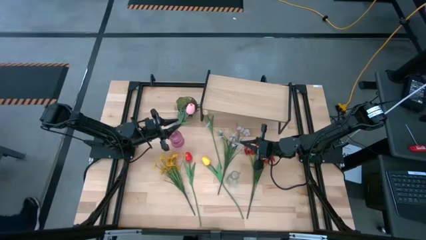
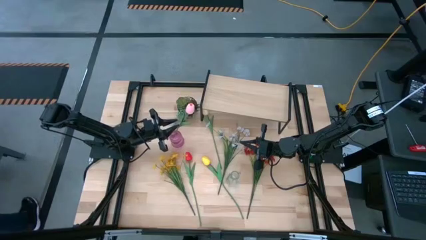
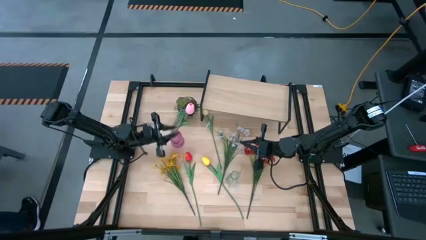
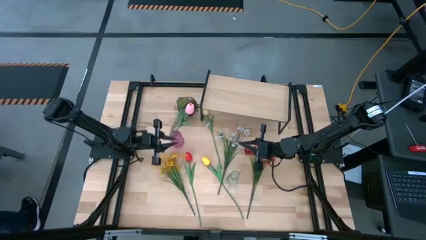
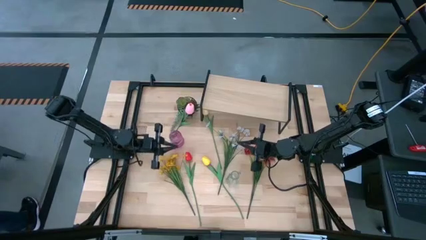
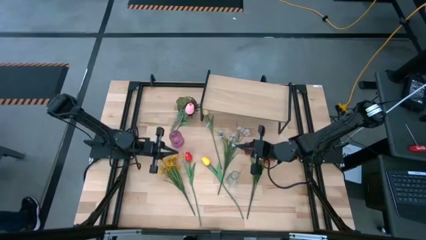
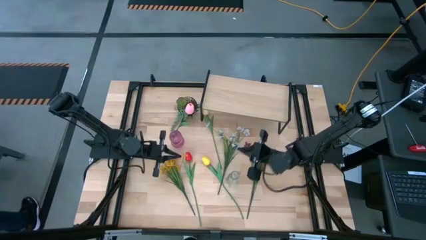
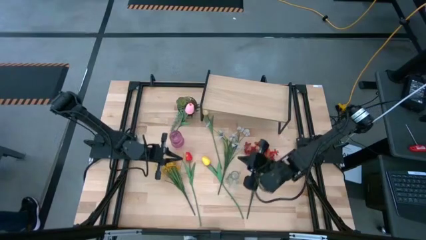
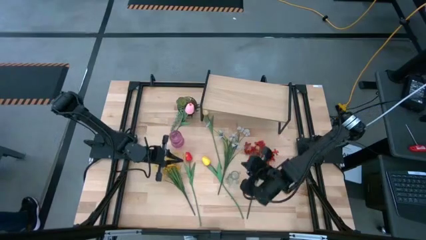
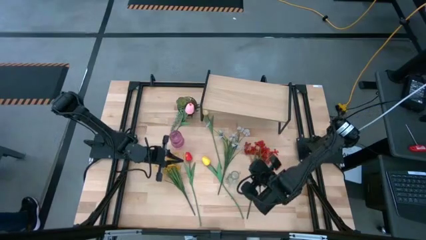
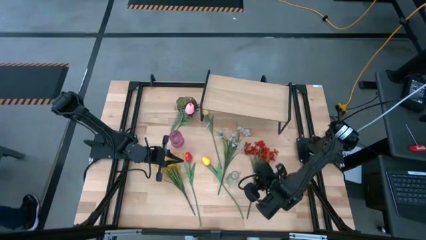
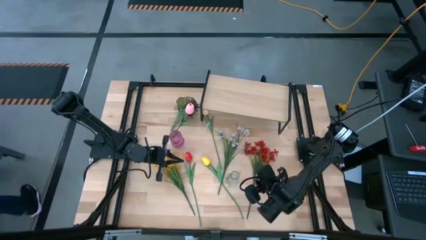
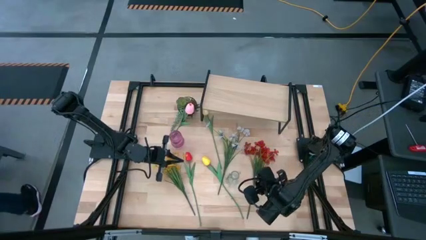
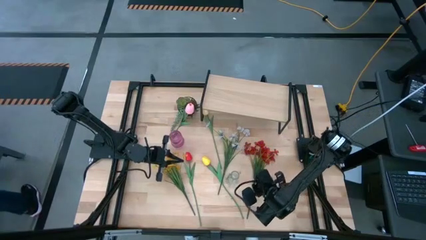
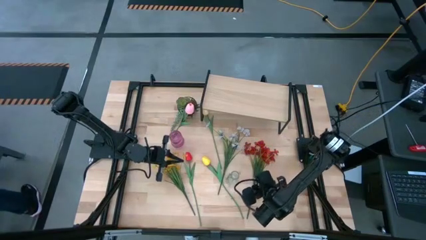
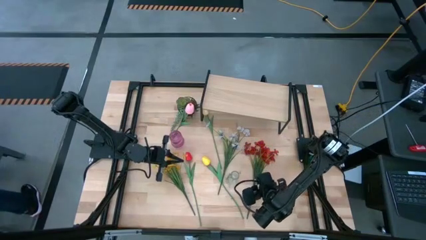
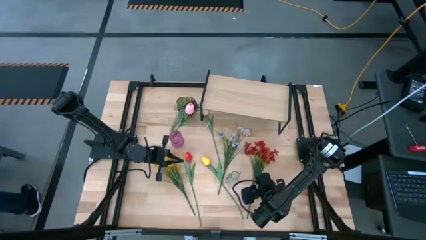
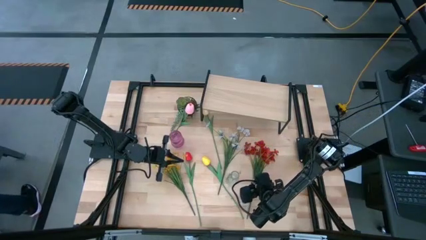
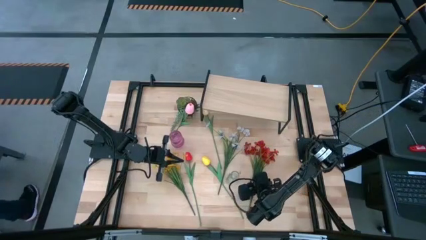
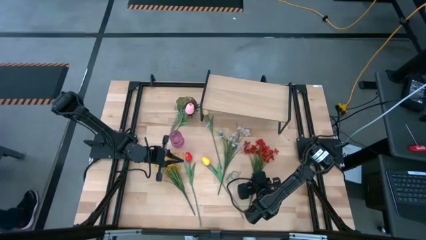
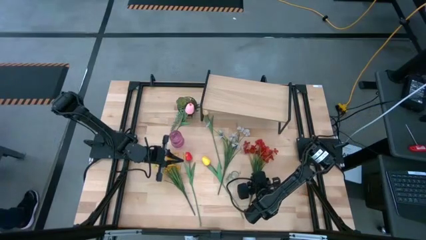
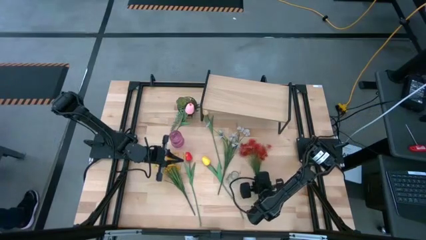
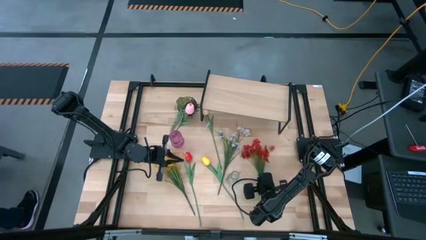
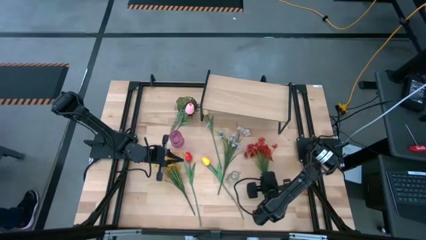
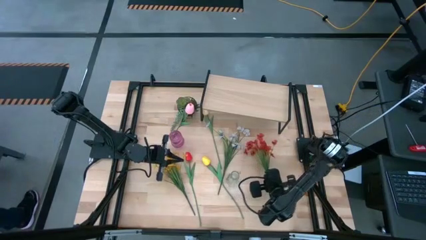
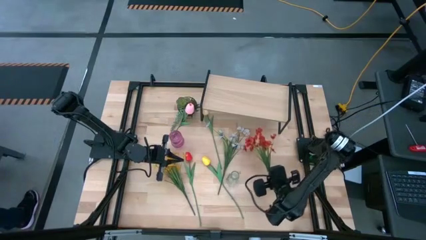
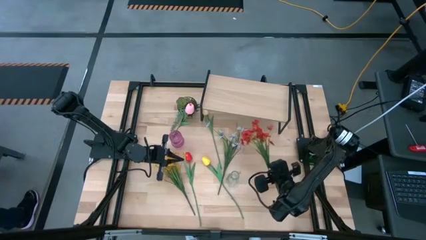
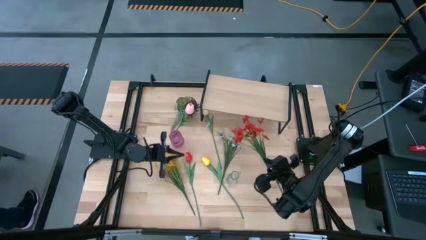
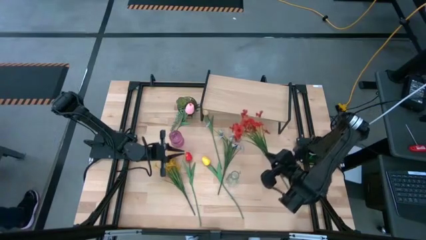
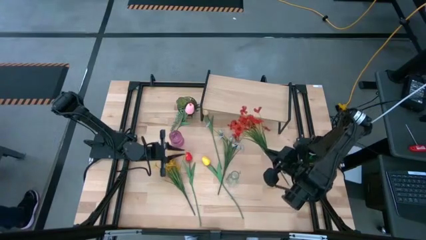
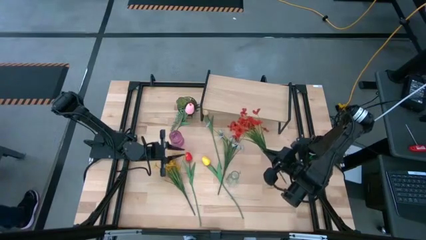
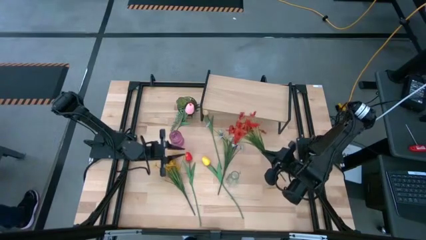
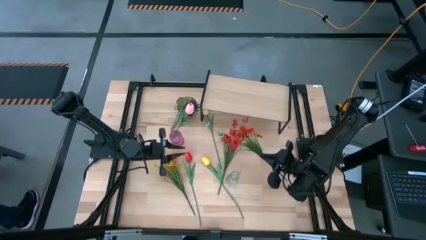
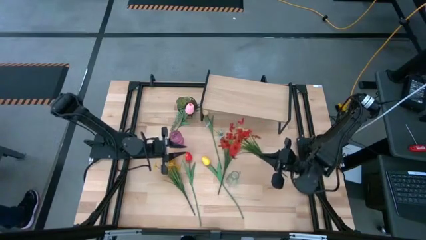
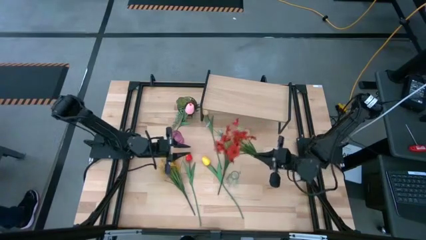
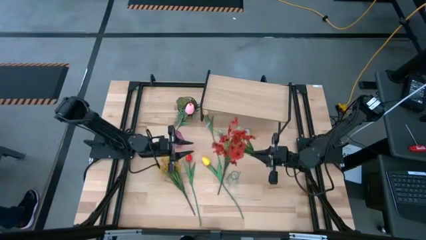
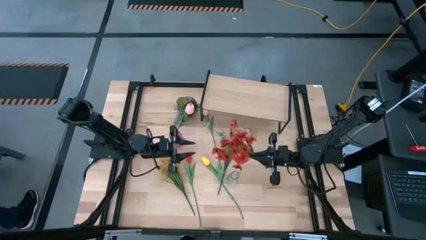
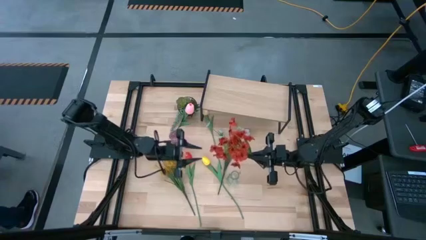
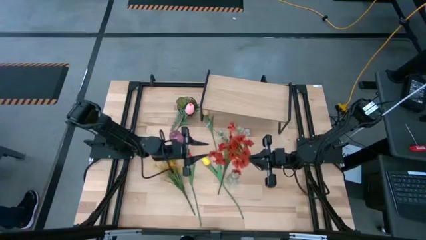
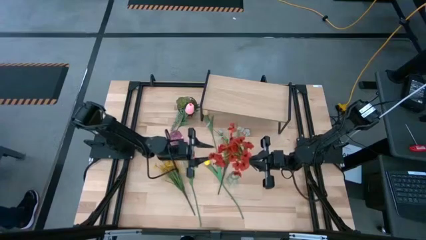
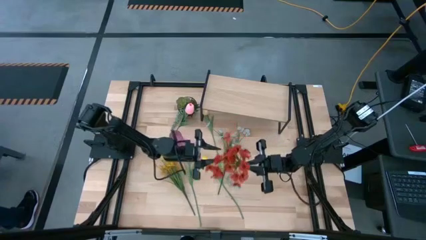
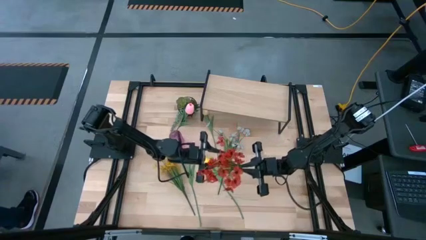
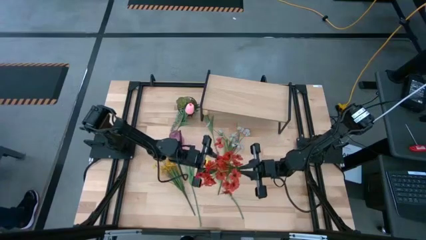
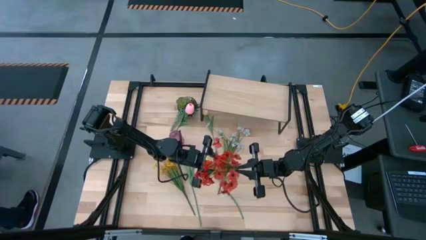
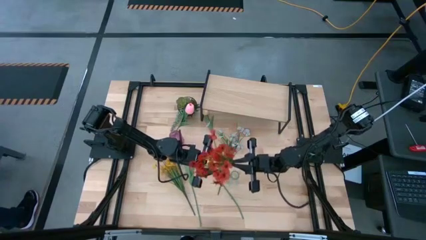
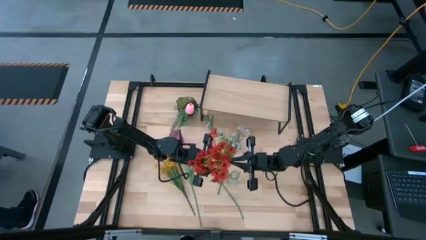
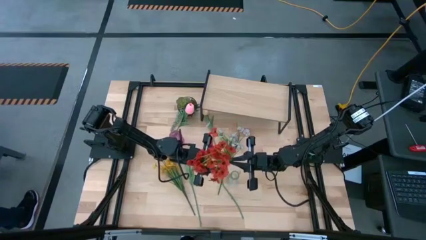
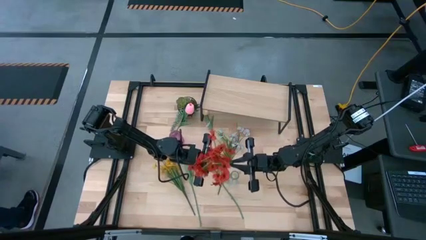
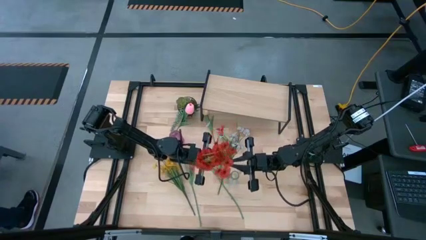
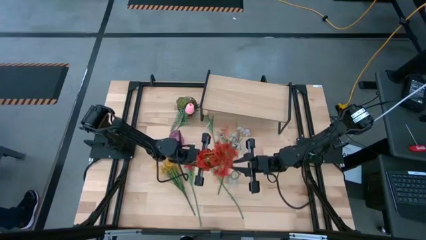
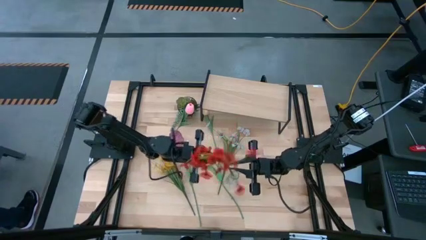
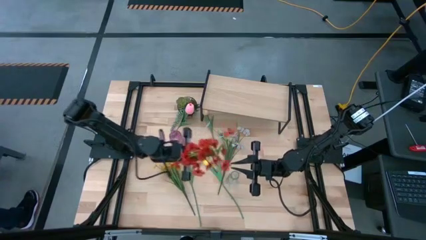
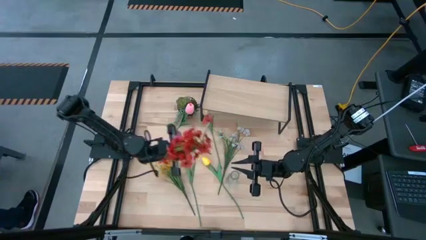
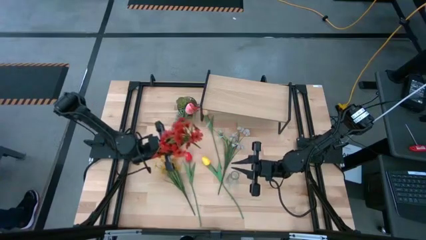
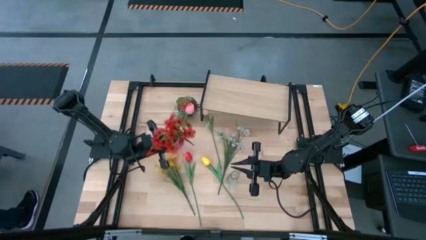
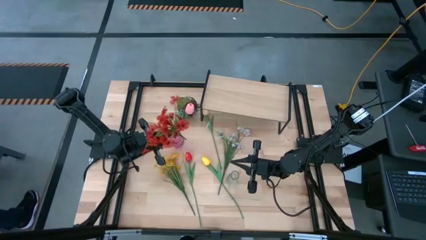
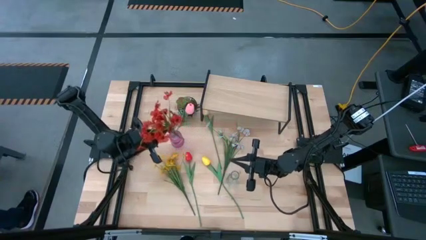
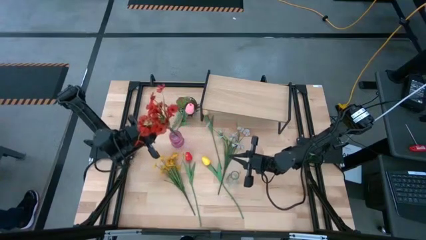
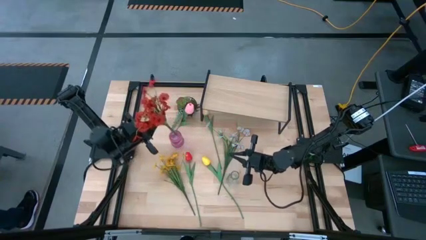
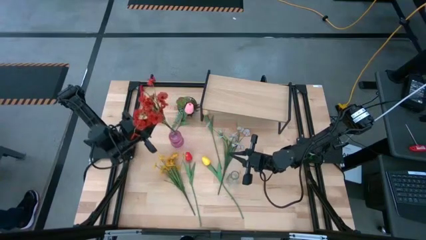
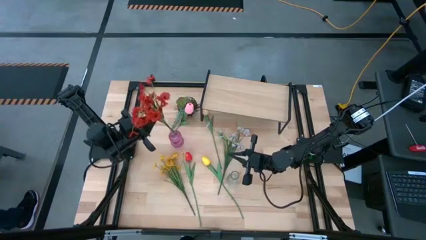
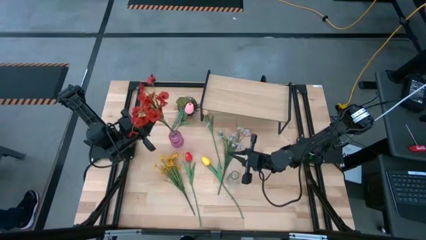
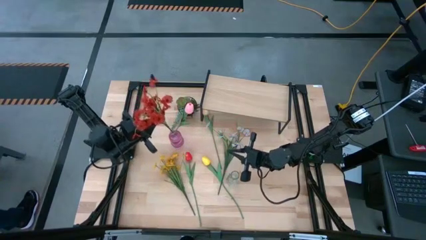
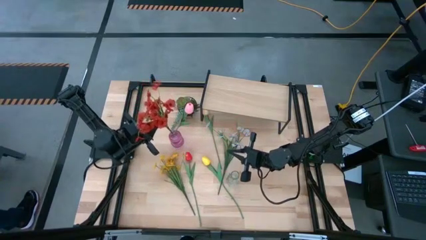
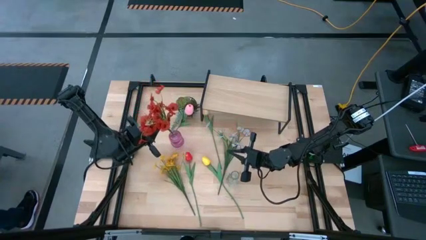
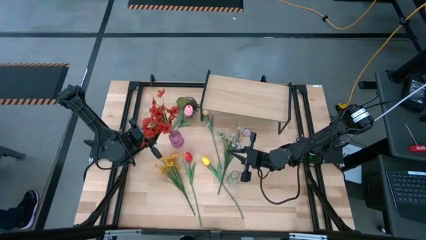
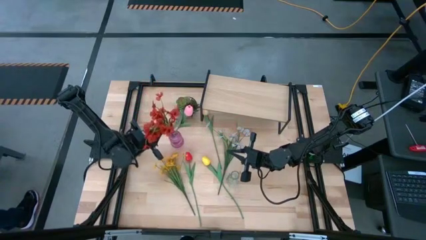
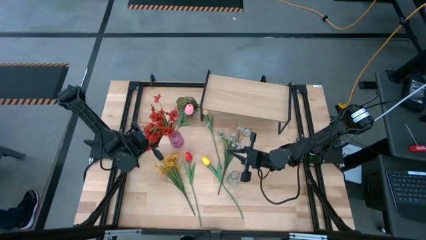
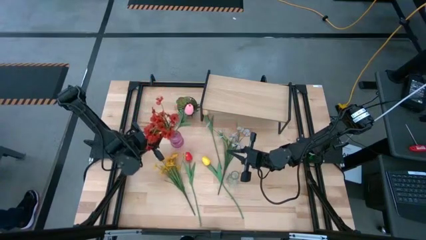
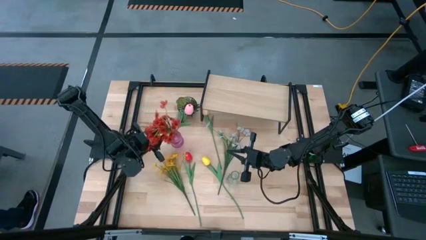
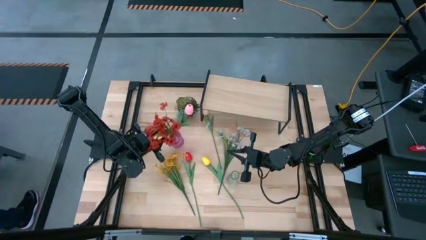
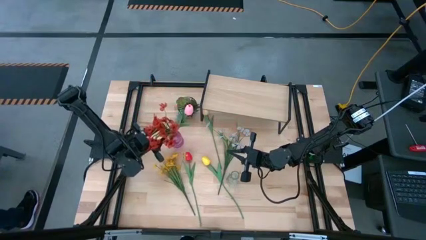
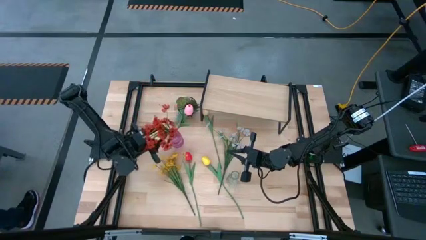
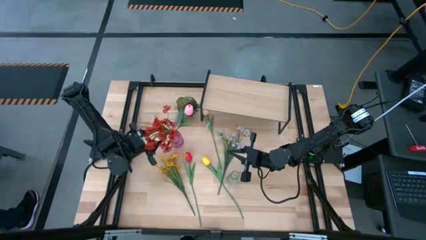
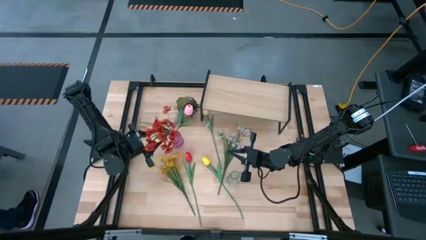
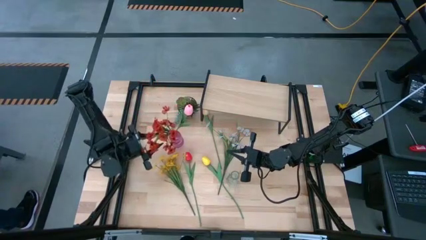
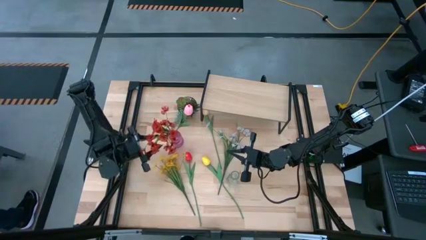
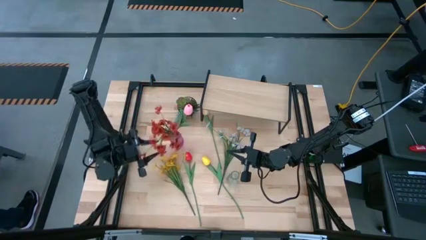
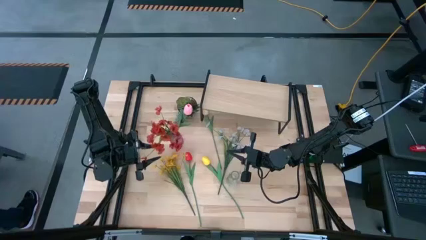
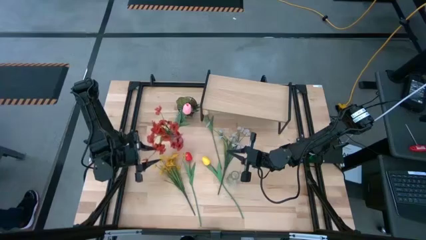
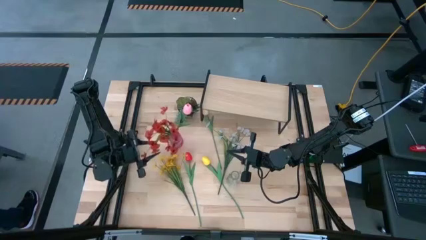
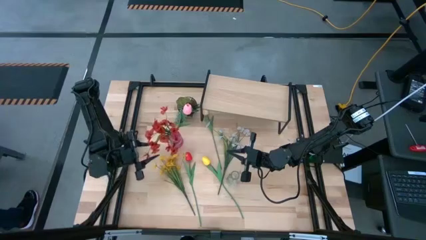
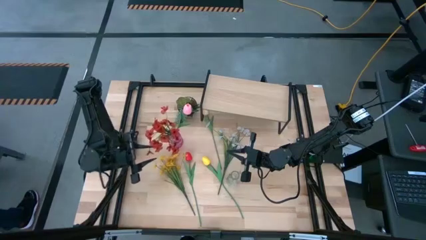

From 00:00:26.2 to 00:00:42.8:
Task: Pick and place flowers into a vace then onto a shelf
Put the red flowers into the violet vase
